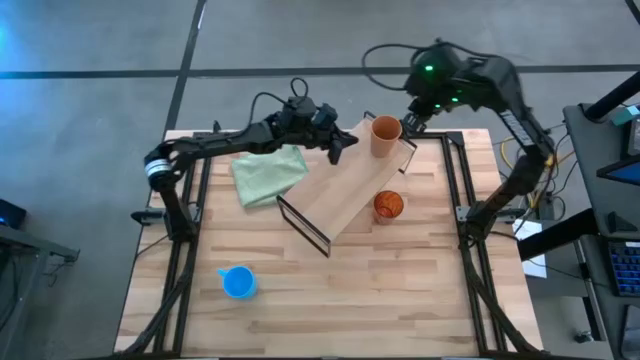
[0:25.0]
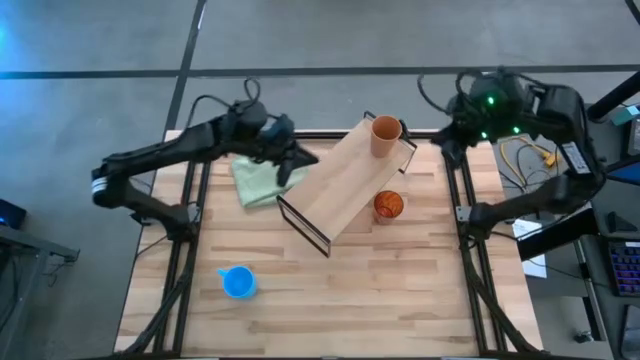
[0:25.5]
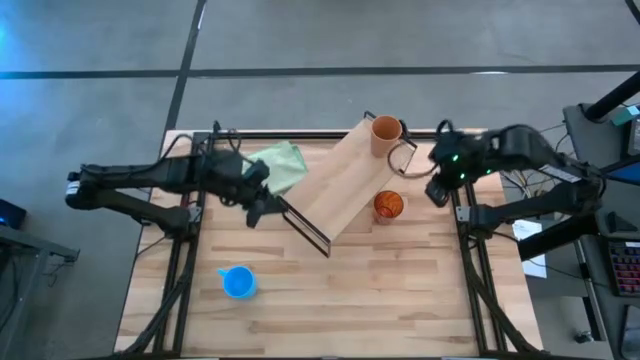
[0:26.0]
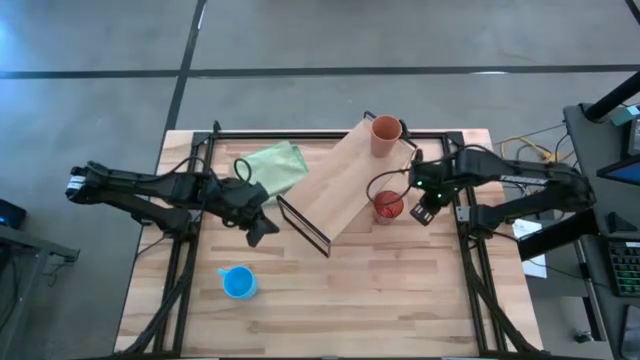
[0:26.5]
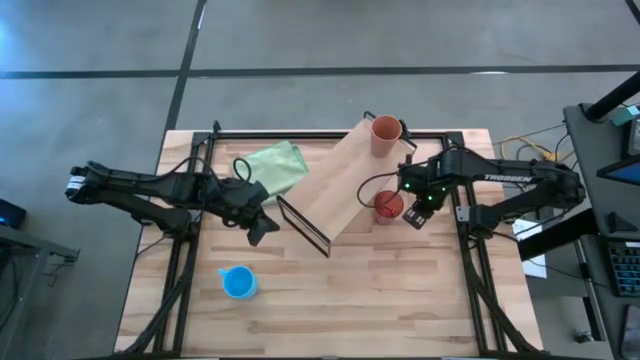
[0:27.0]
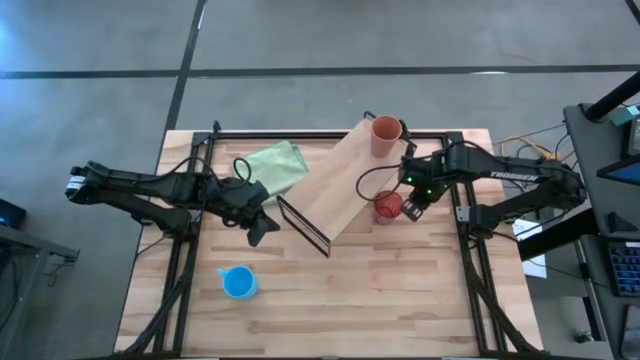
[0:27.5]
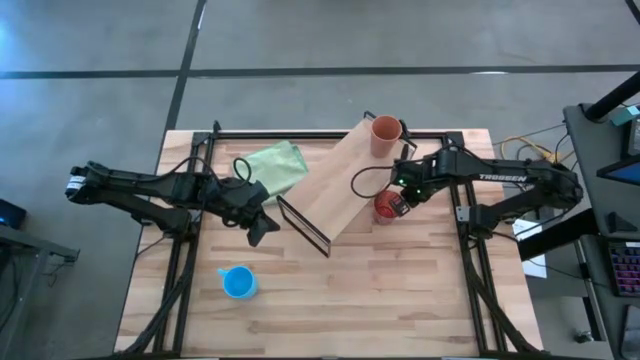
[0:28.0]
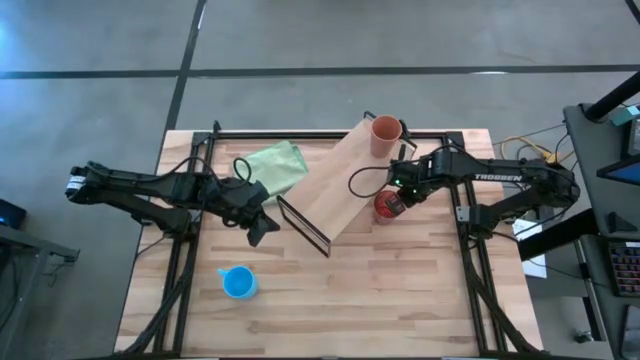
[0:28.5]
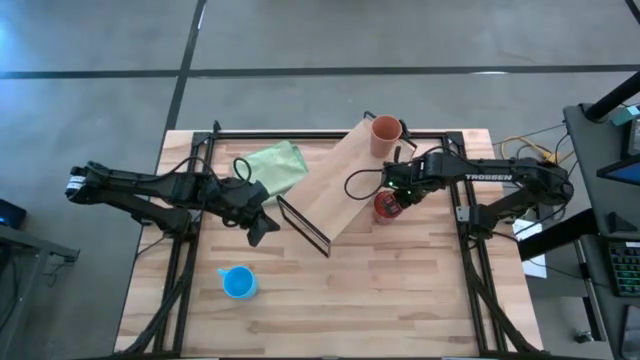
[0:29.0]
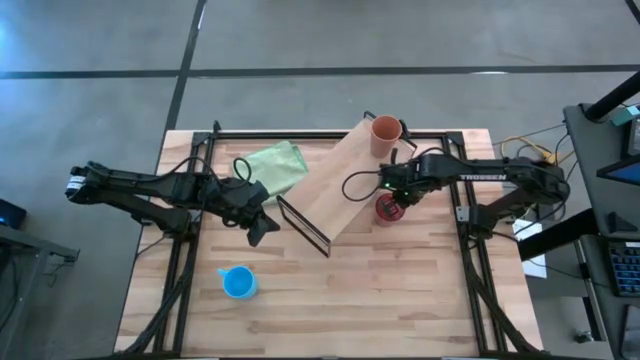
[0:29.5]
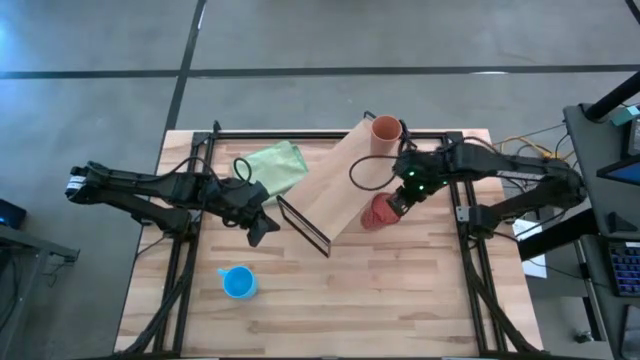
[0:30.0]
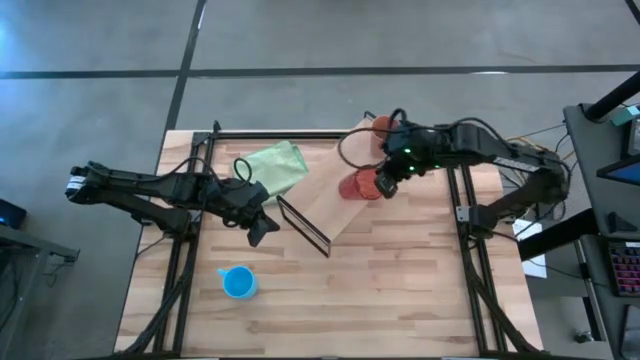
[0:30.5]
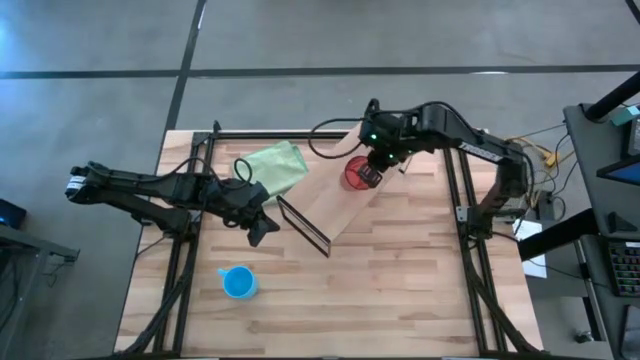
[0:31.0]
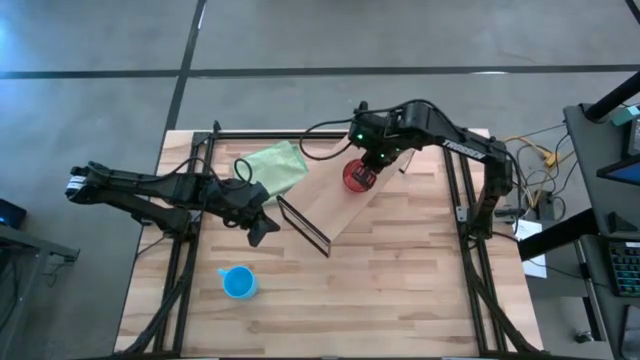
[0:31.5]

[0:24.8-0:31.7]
Task: Stack small to large cups/mugs on shelf
Put the orange cup on the shelf

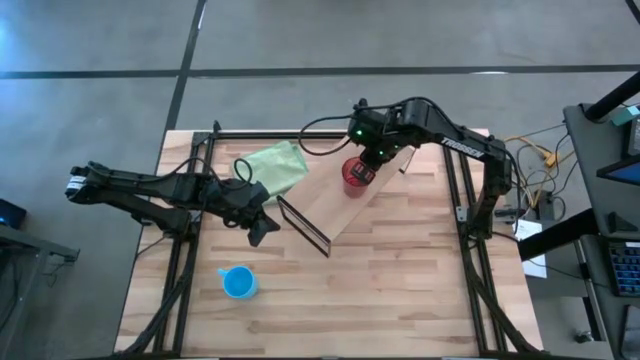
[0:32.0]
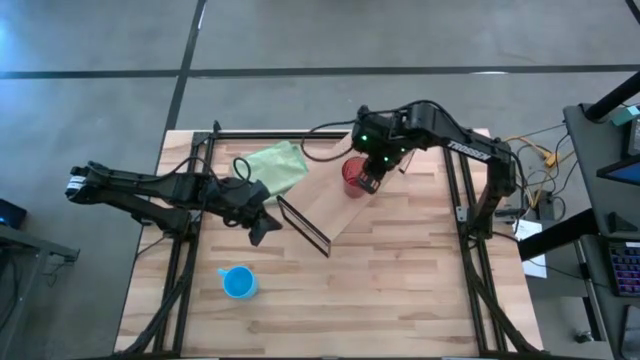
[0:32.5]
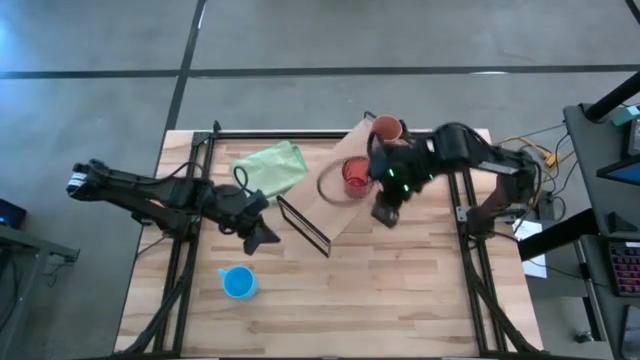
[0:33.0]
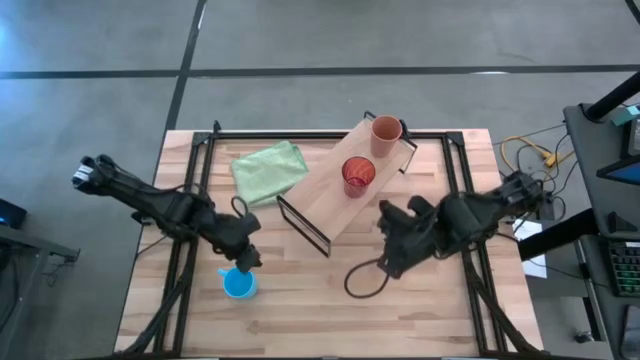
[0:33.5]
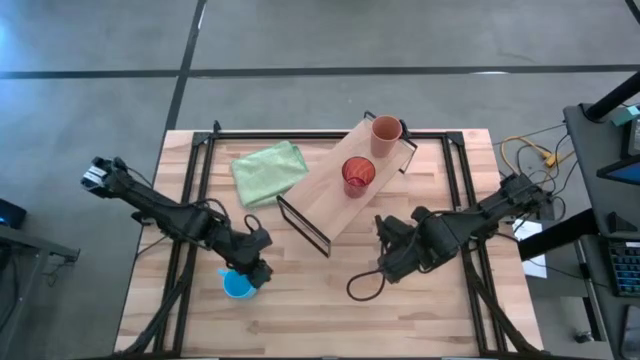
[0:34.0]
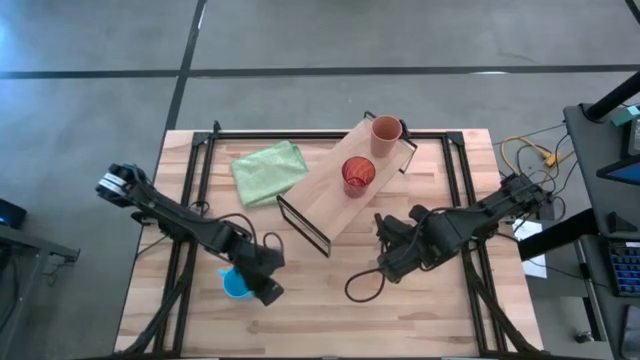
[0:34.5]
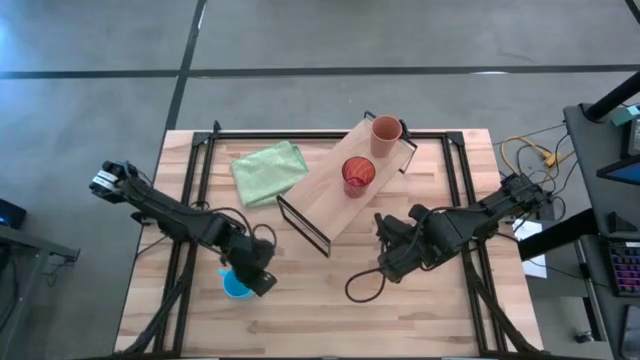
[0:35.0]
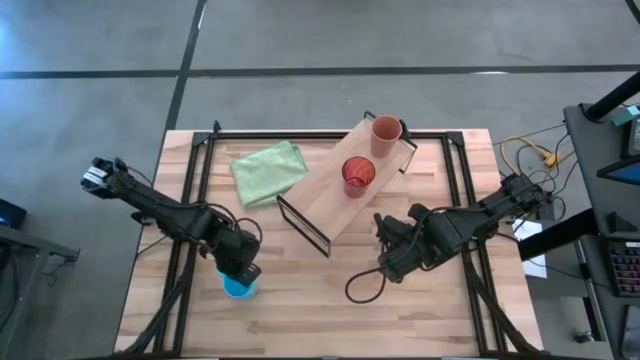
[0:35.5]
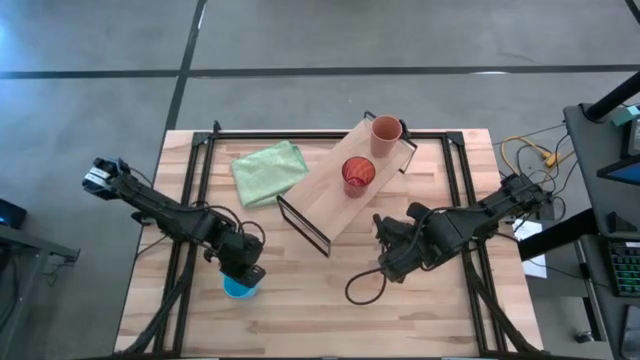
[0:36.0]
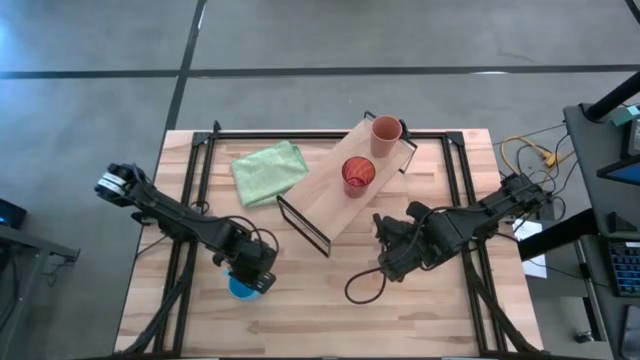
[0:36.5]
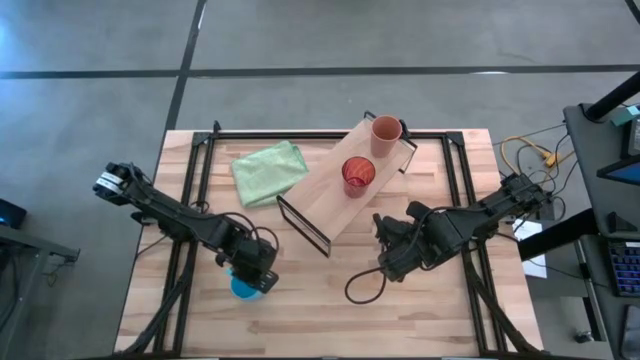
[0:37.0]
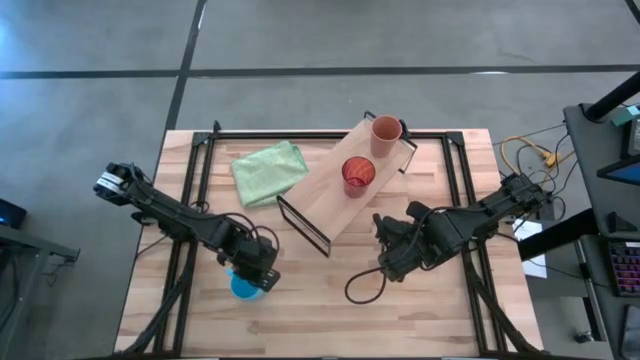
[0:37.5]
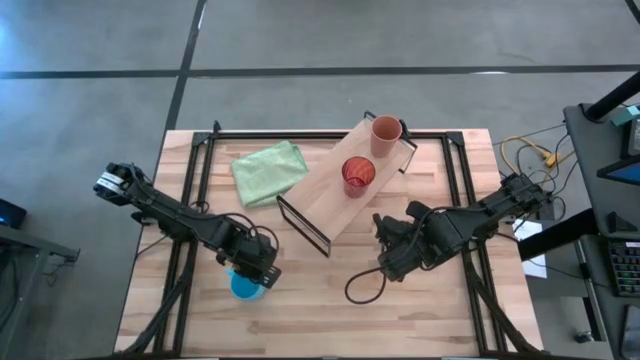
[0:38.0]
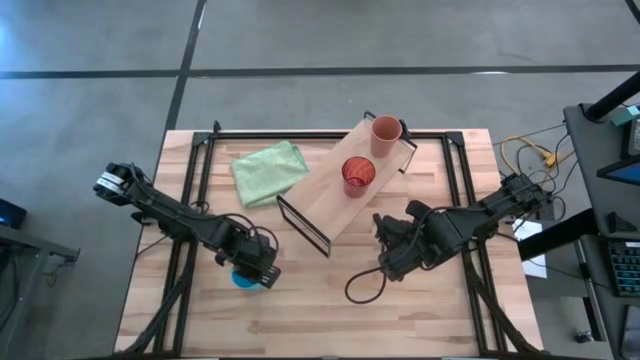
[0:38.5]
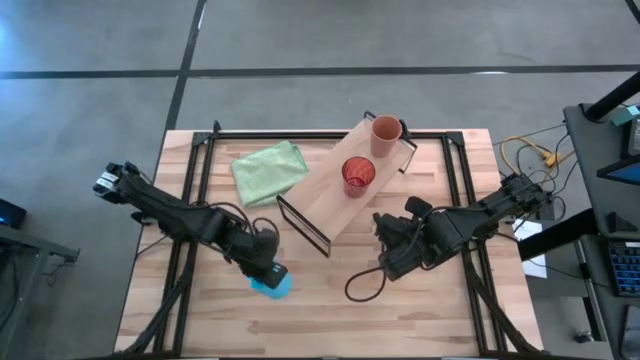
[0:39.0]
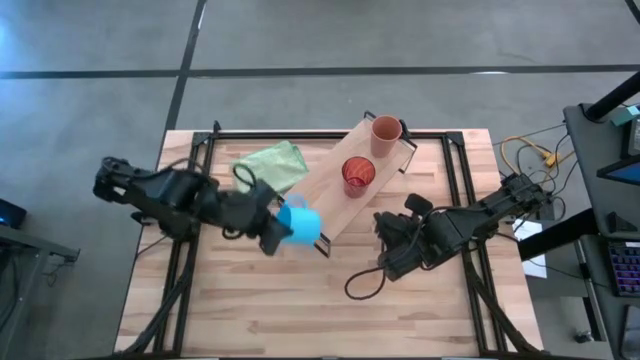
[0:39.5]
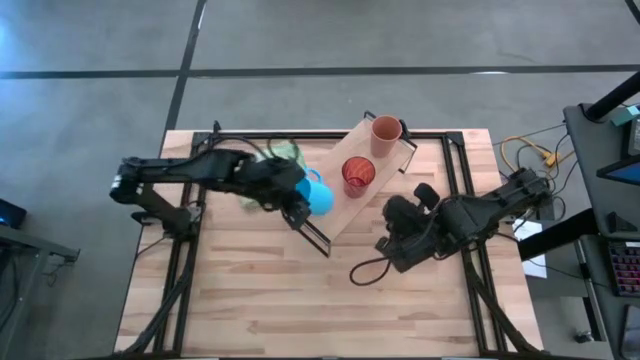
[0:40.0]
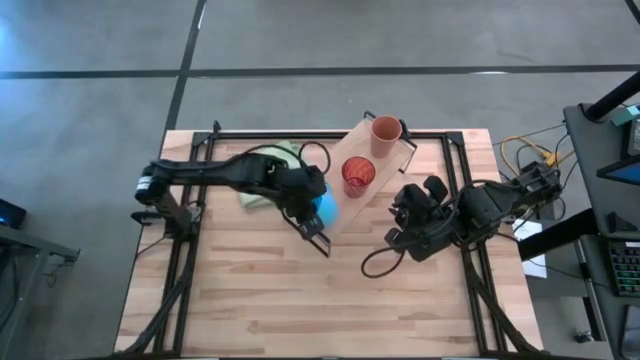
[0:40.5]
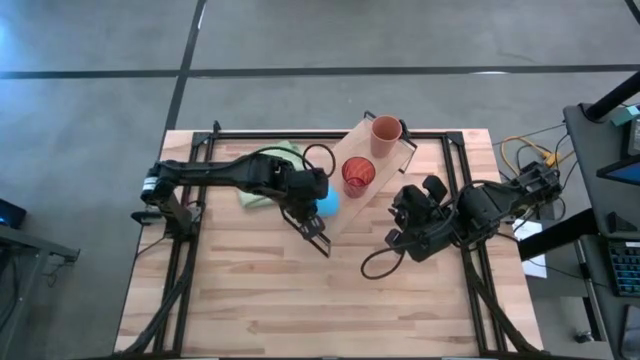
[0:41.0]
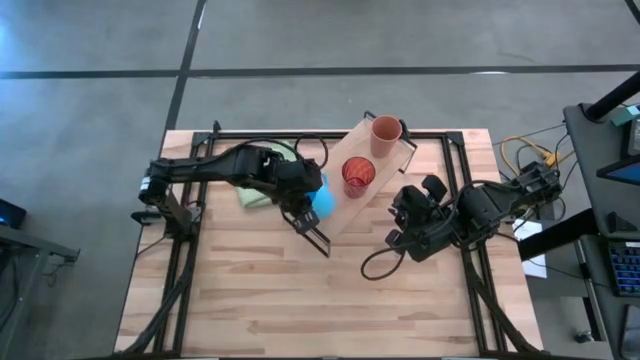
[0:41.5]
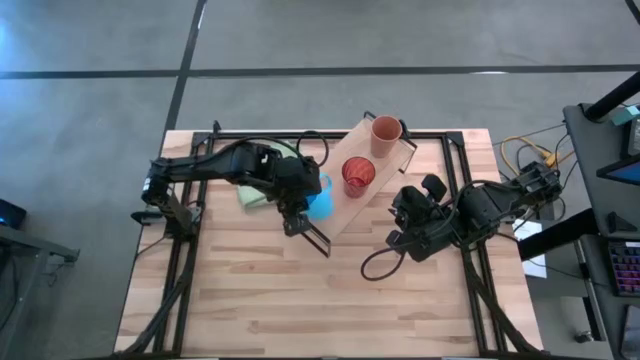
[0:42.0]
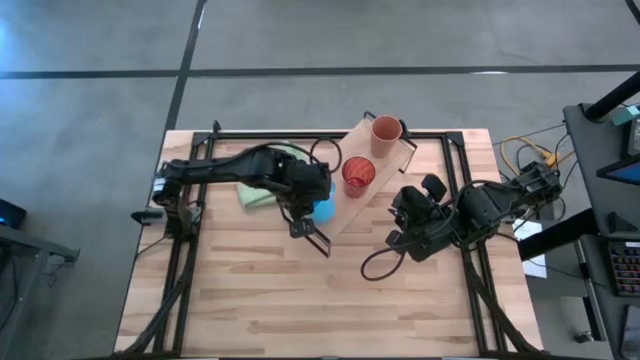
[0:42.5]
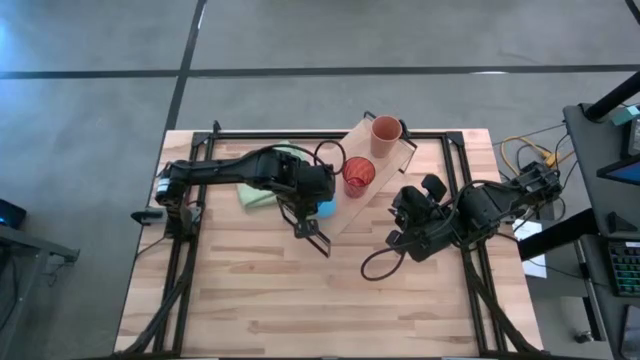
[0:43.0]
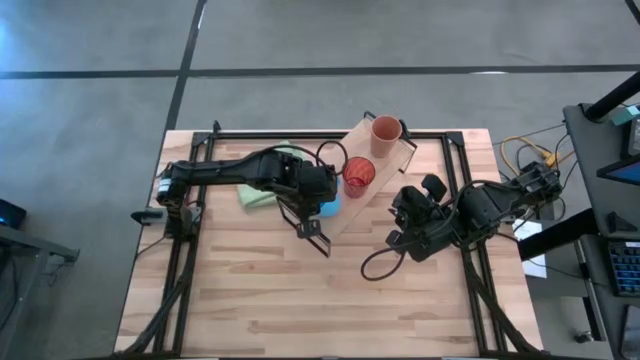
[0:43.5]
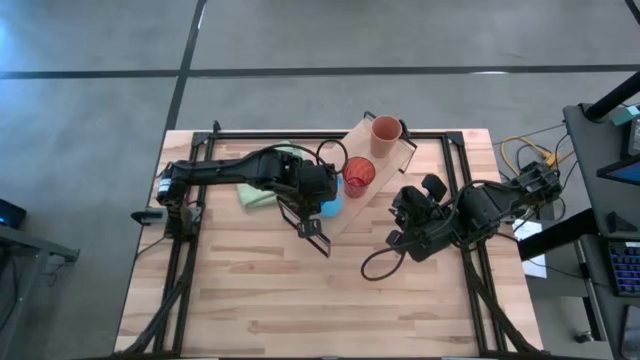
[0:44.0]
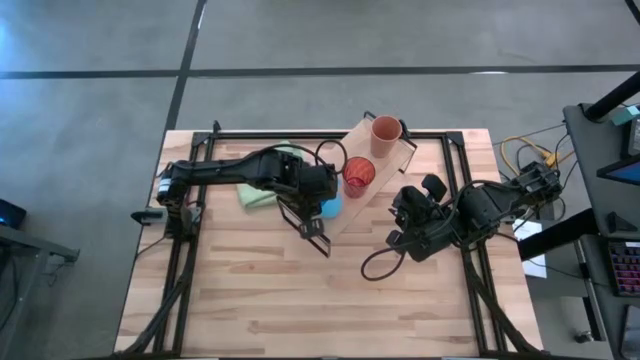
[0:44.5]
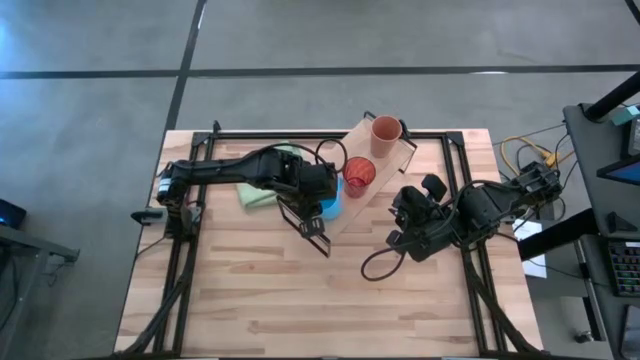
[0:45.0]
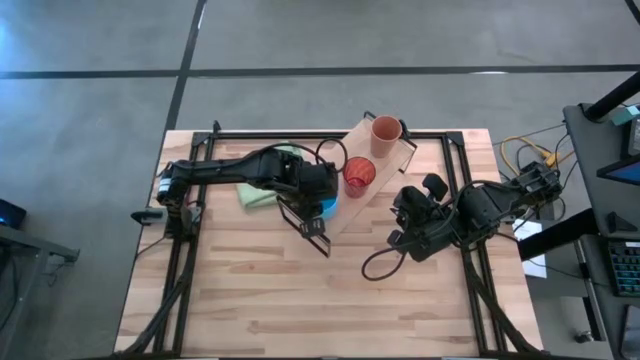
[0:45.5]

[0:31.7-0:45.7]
Put the light blue cup on the shelf

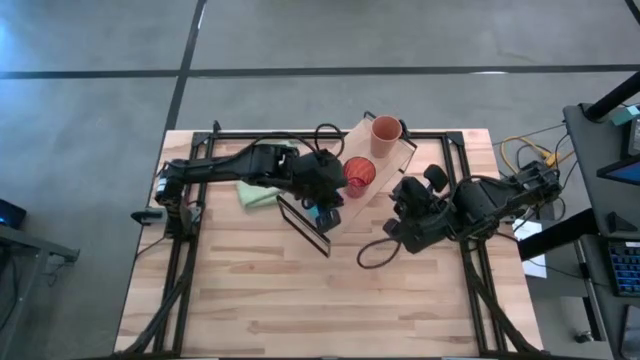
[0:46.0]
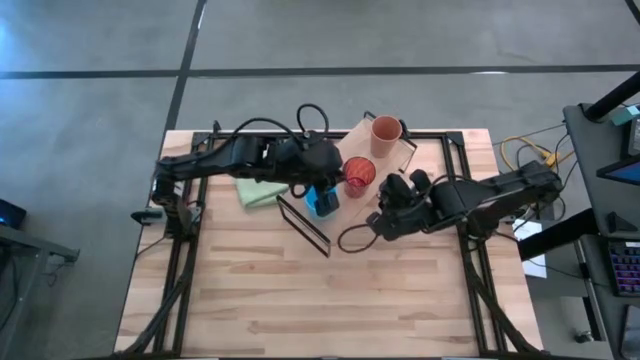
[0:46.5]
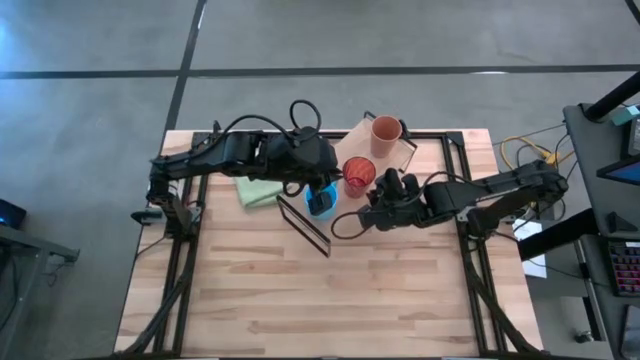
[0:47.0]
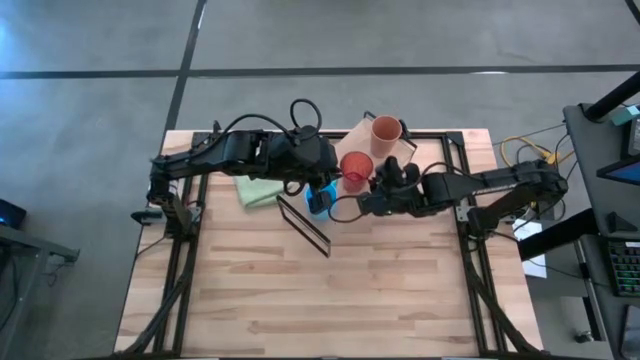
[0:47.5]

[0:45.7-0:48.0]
Adjust the orange cup on the shelf
